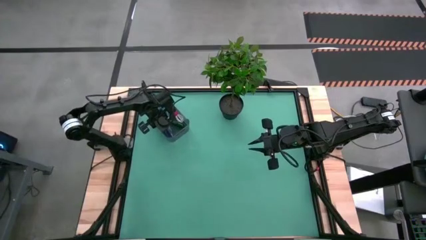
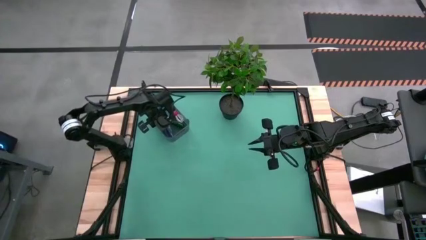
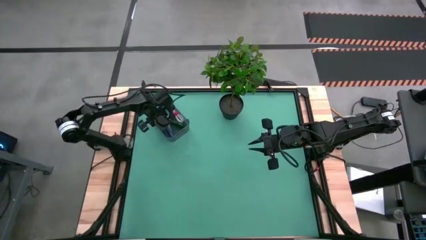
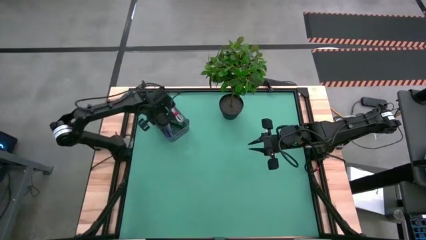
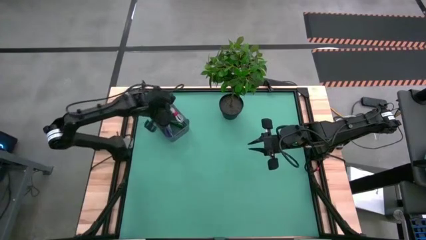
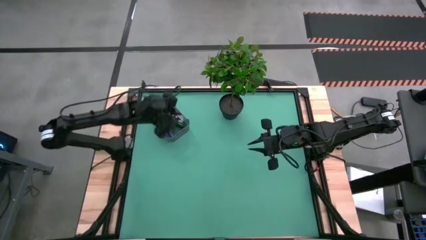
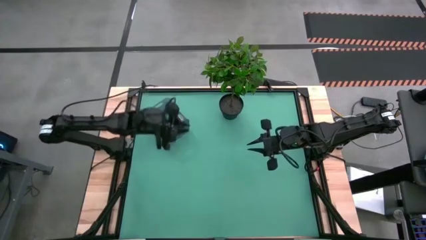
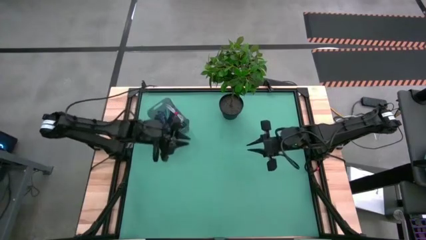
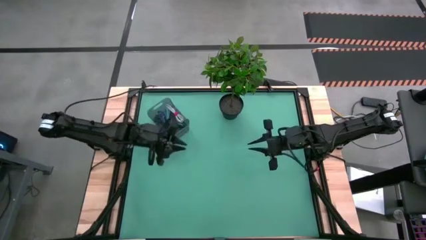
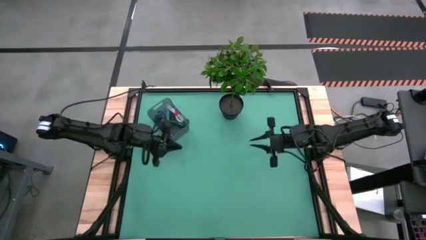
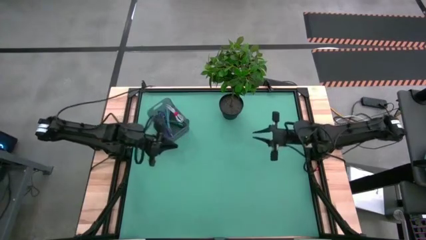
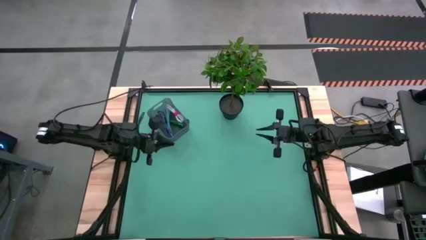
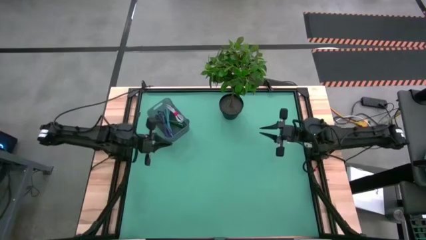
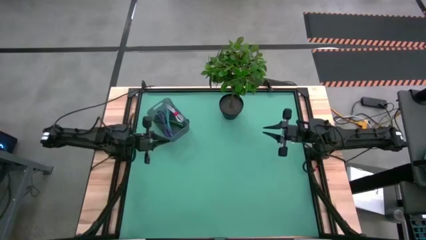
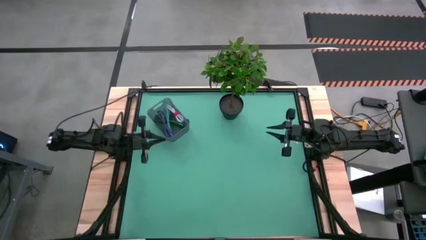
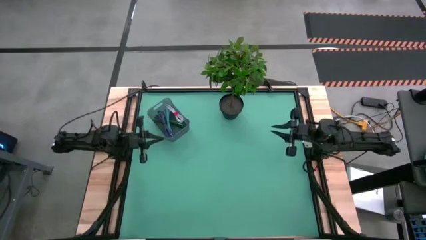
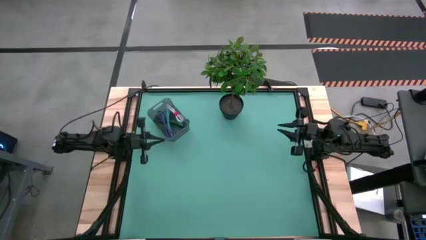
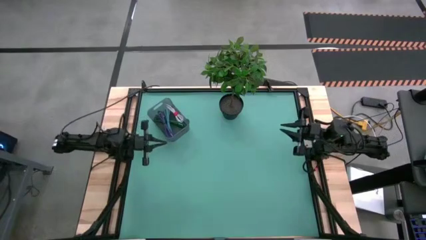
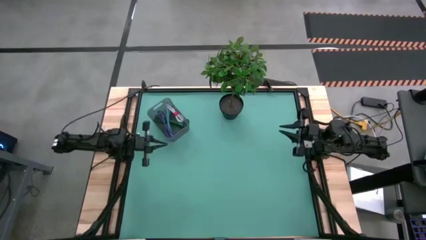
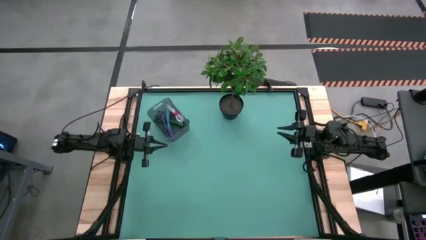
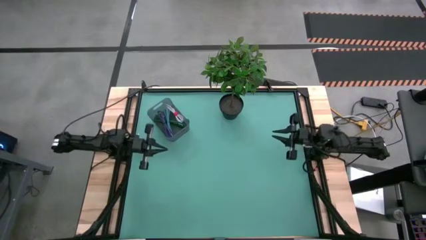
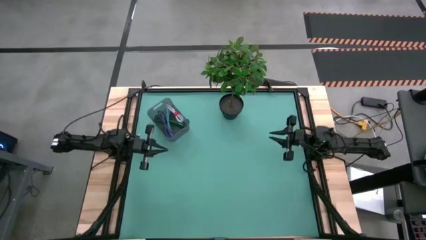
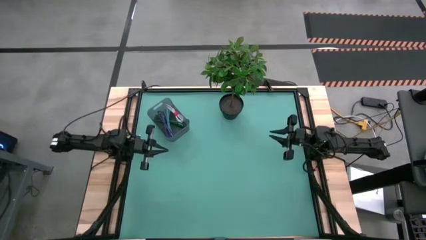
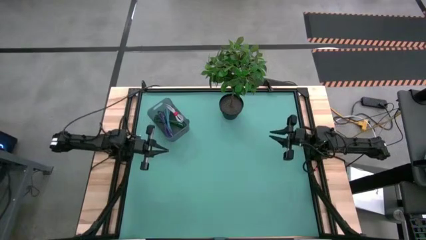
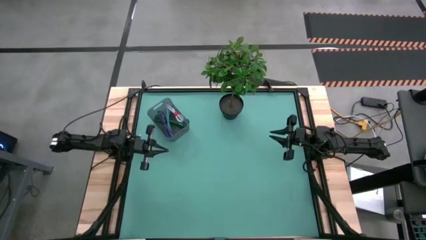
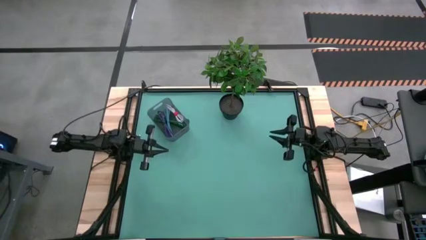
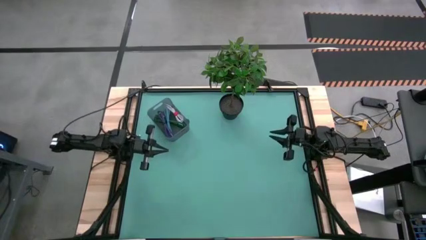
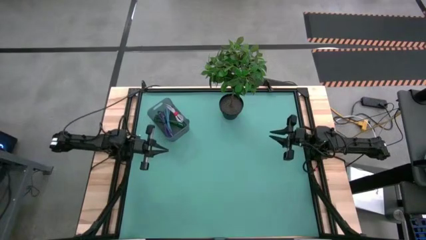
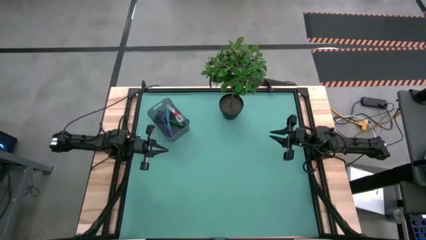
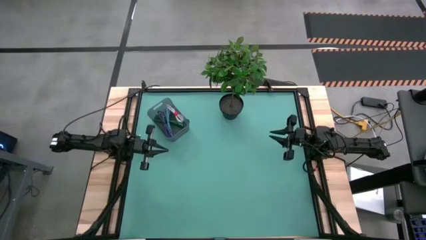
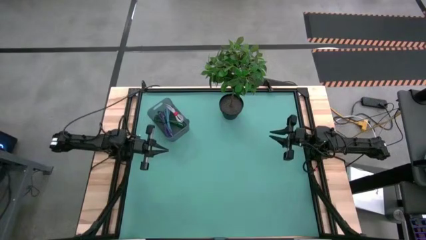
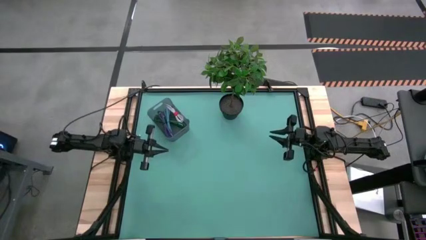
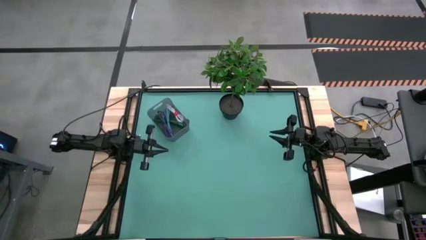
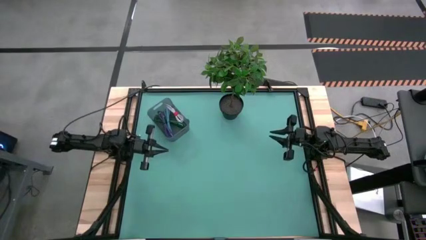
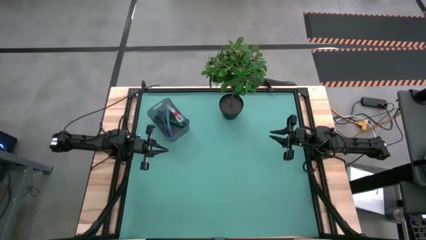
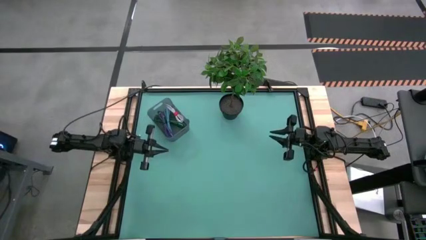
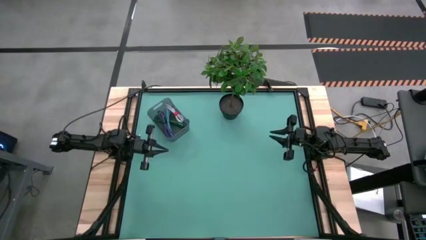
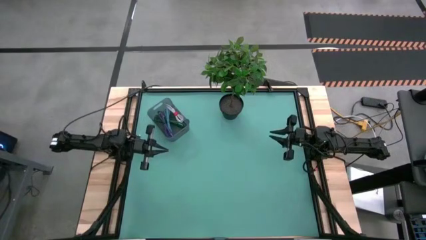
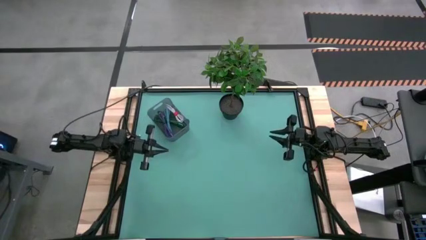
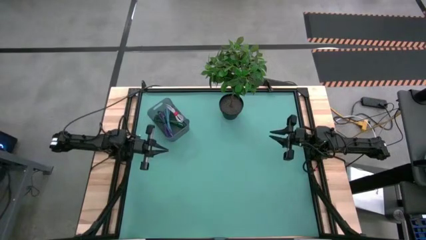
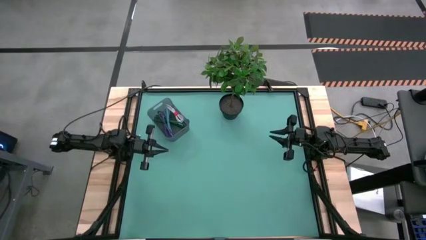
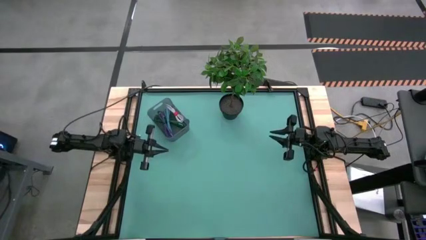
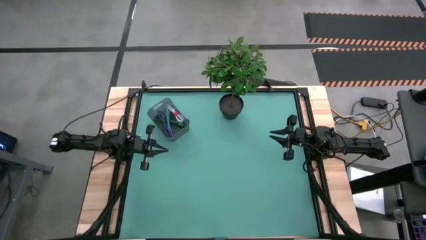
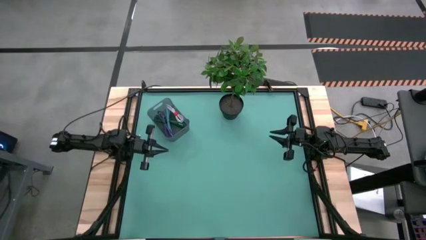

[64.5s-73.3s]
Task: Pick and place USB-C Cables
Return to Home Position

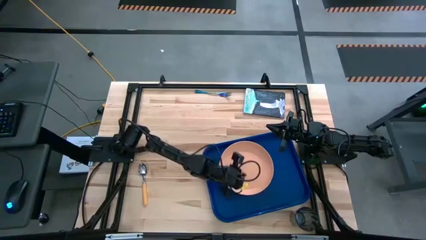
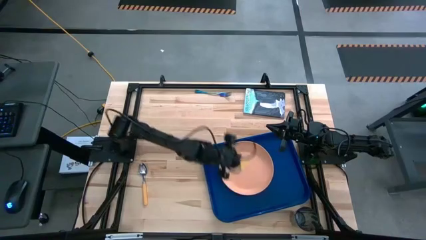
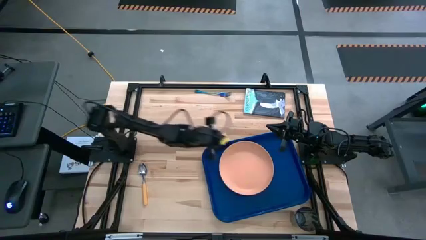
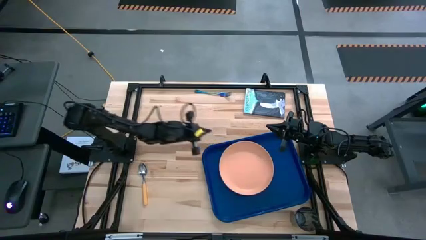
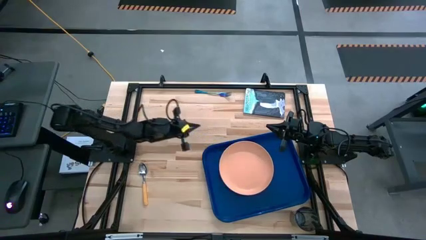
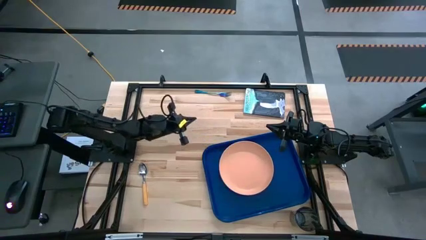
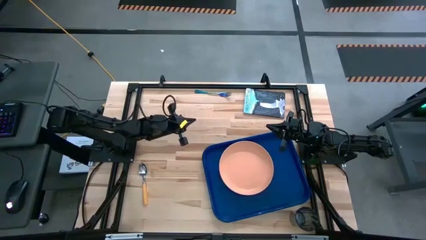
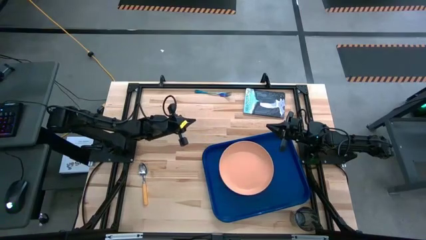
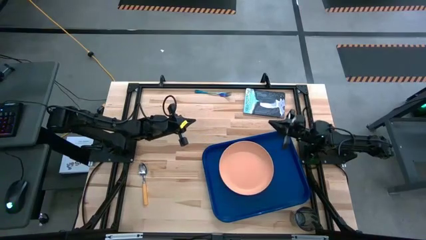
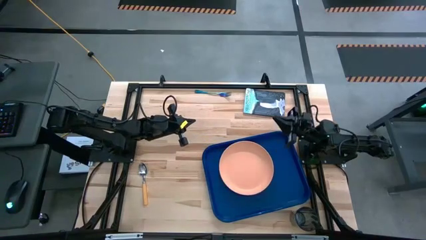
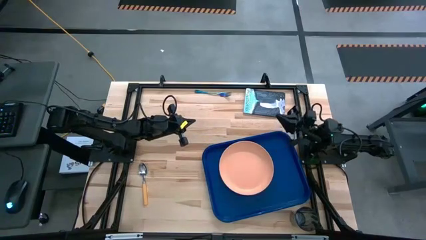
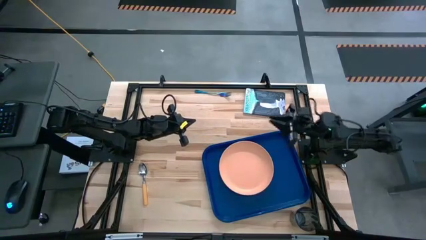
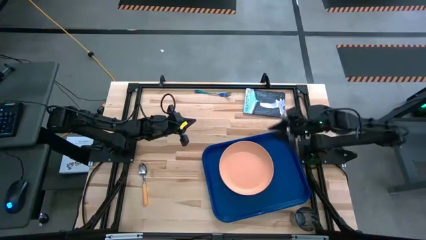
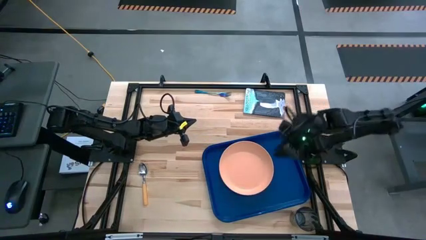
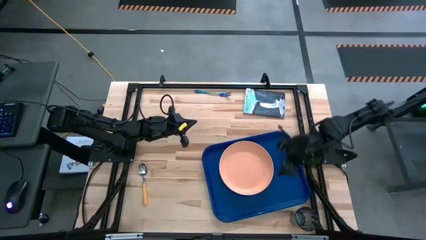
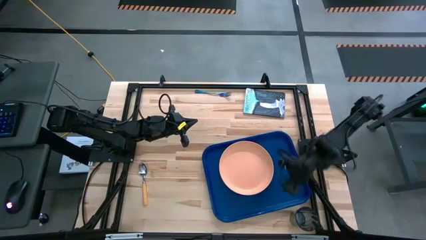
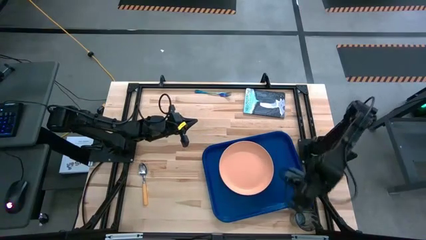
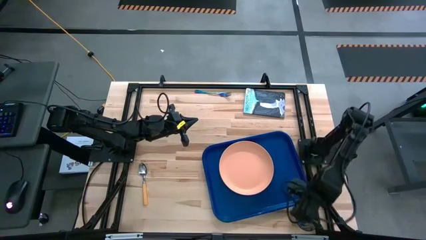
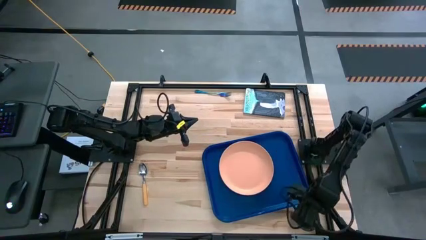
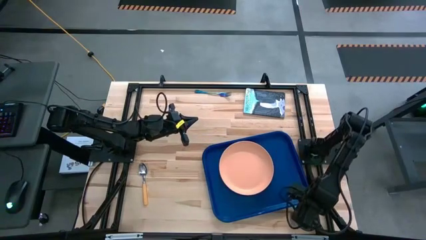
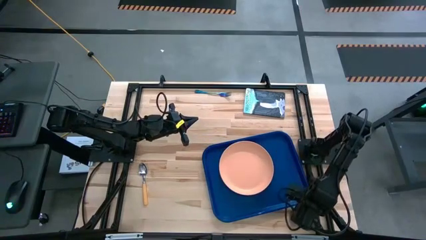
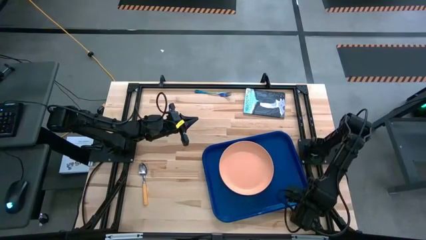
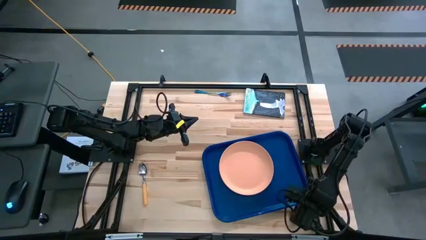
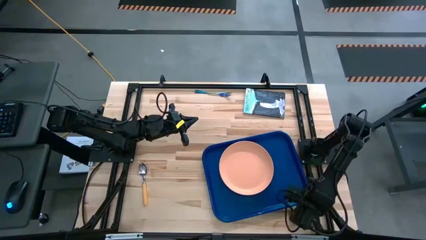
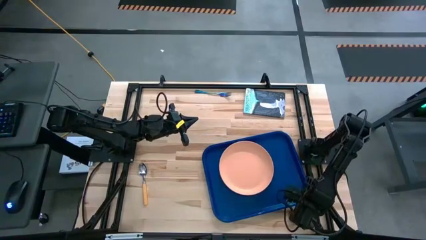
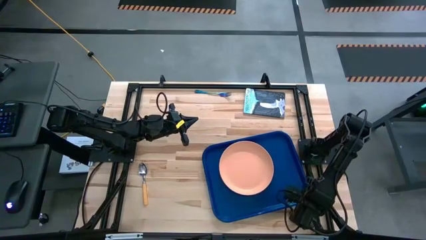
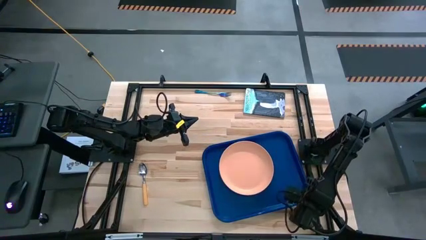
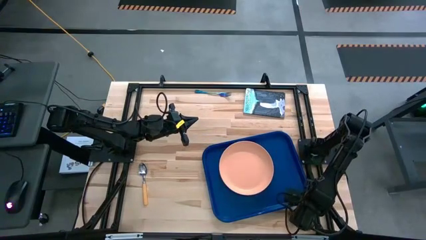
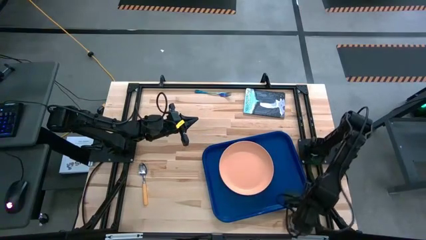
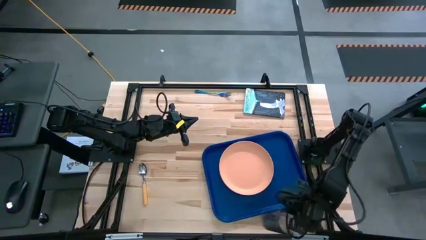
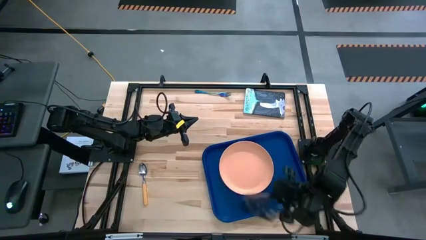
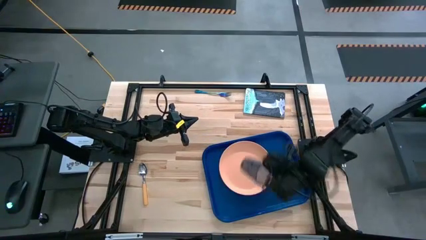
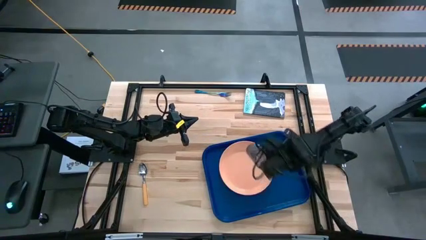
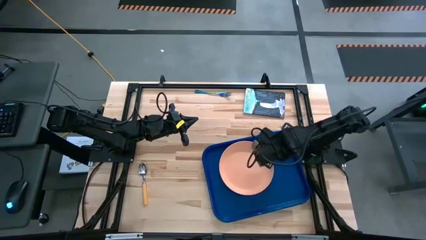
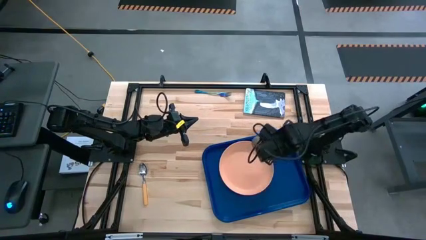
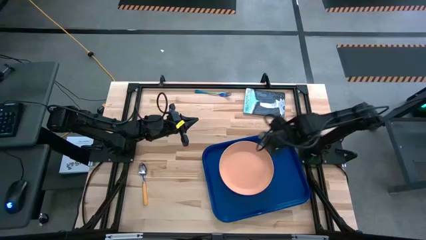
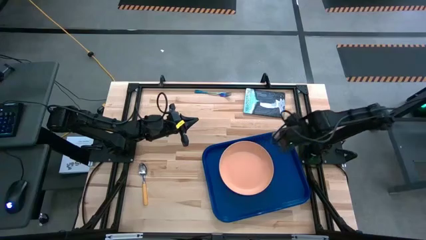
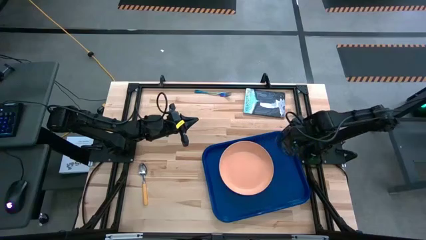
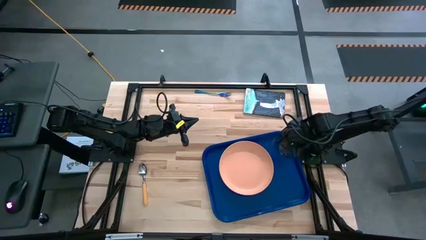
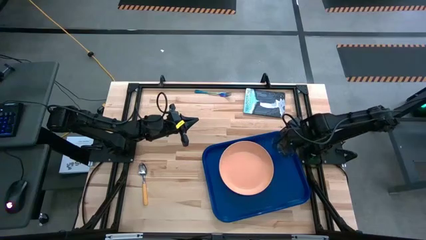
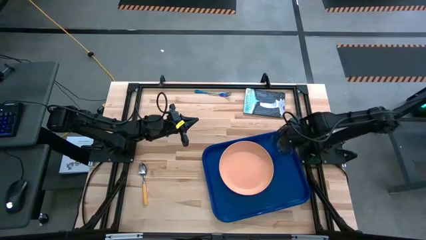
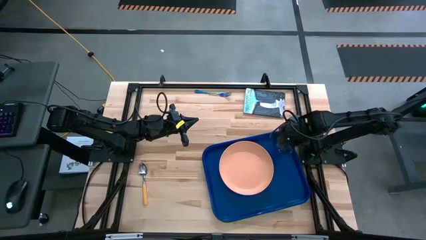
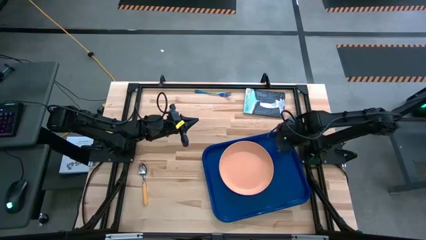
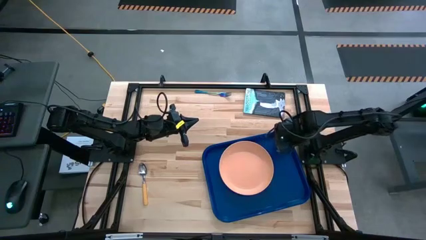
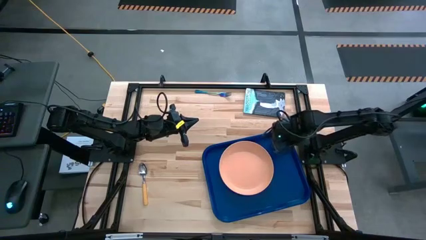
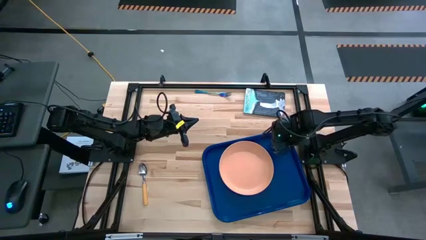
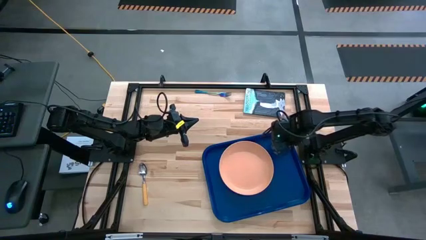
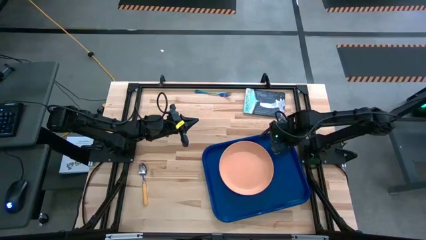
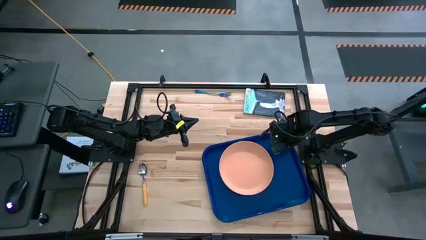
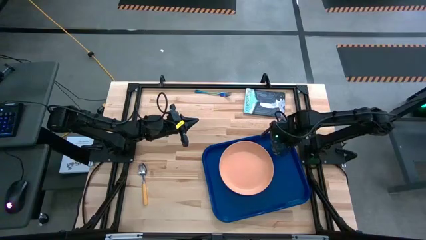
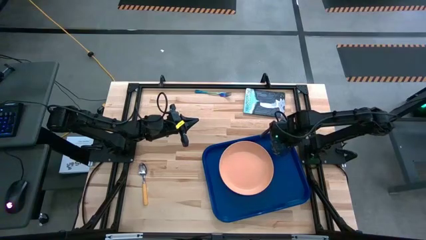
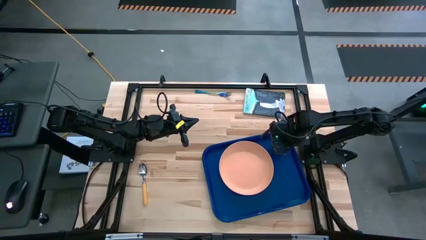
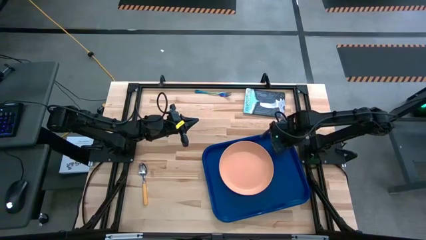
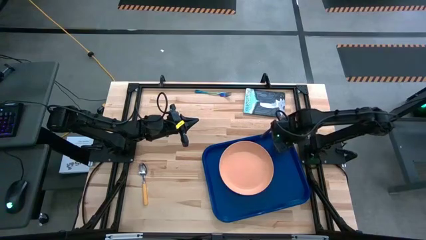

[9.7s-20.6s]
Task: Pick and place plate/cup/fork/spoon on tray
Put the blue glass on the blue table tray to the top right of the orange plate
